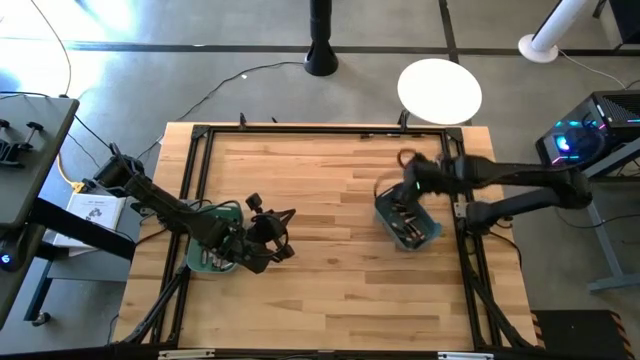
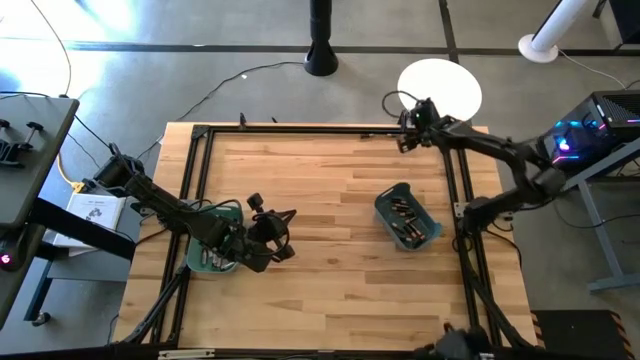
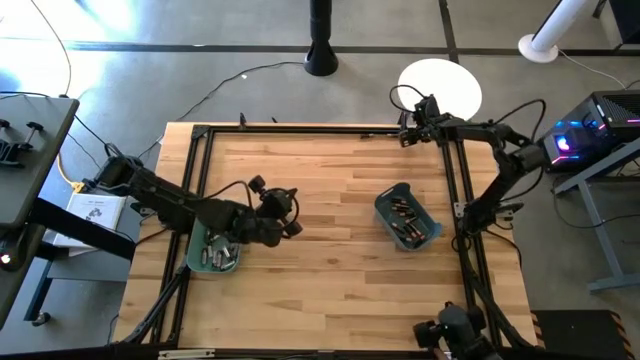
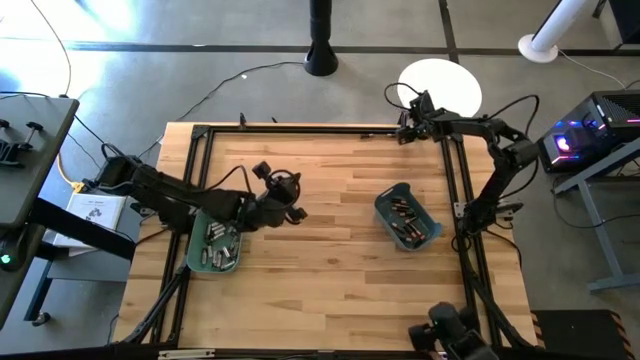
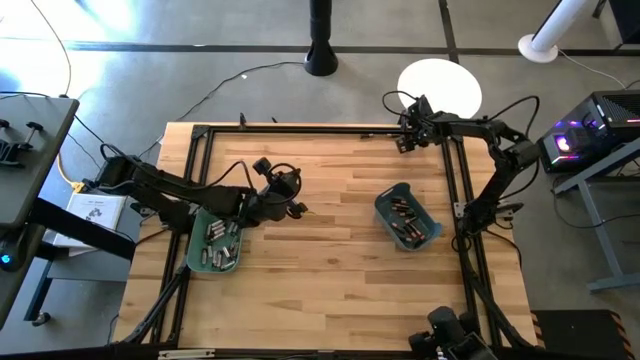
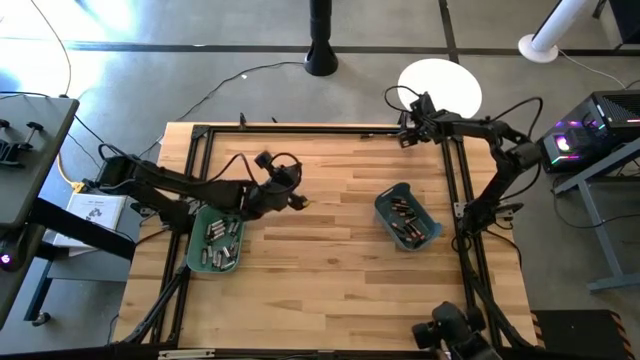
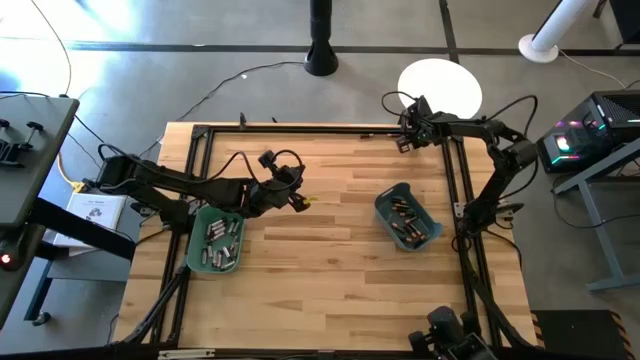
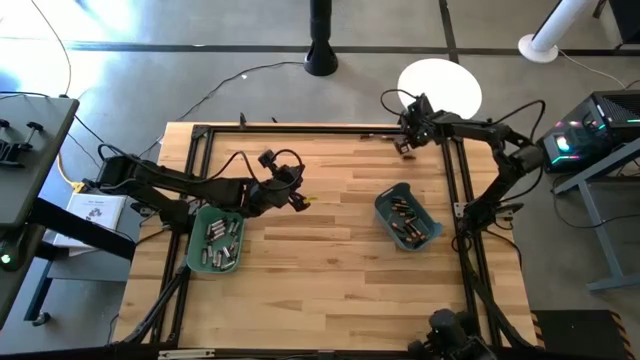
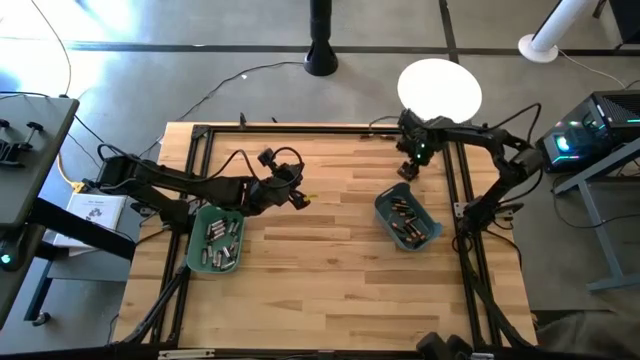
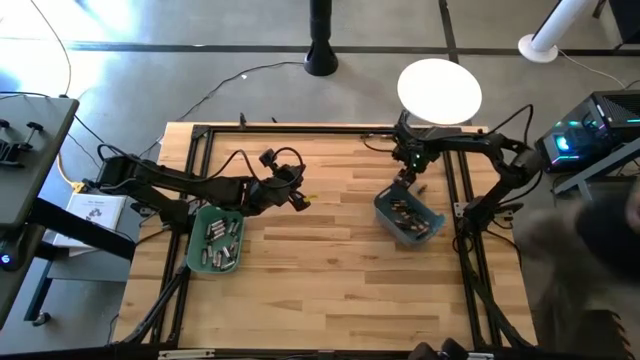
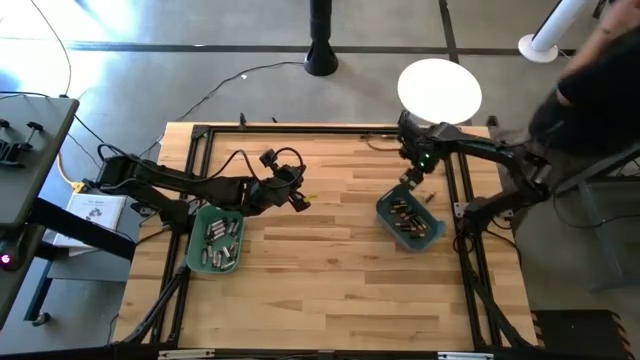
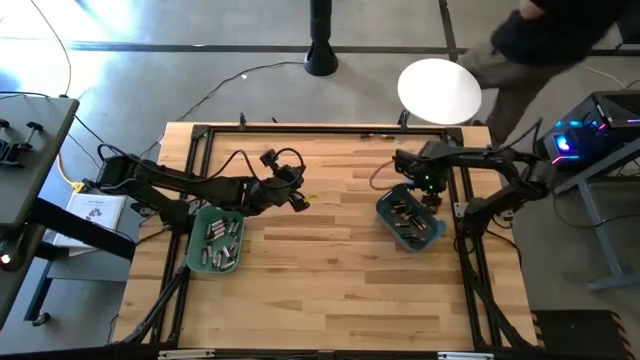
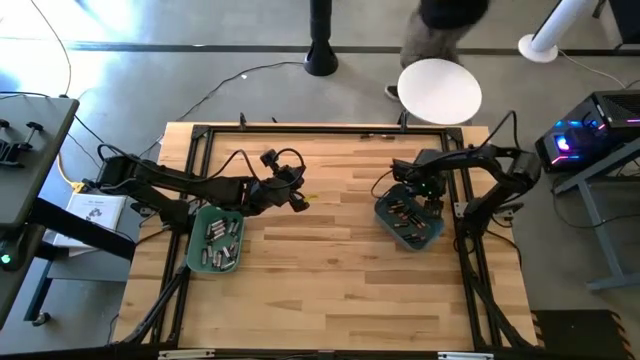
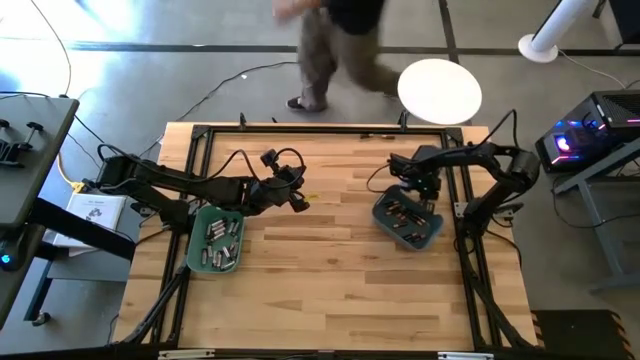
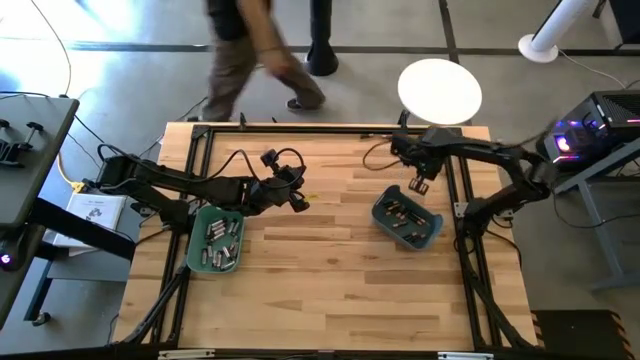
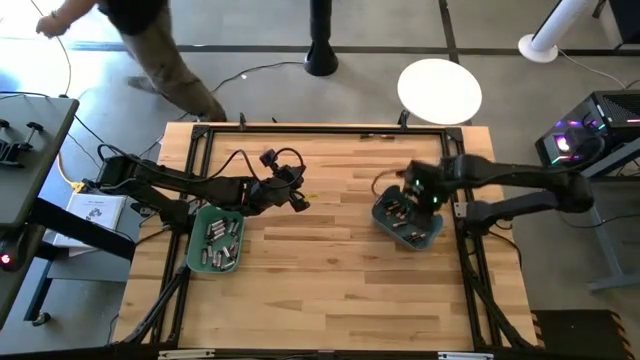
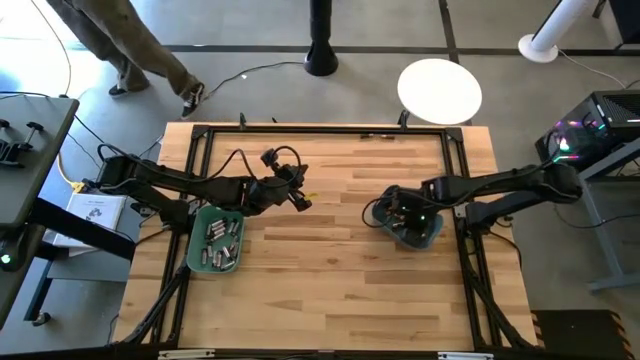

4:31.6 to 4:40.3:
Task: Sort batteries
Put the black battery into the blue bin

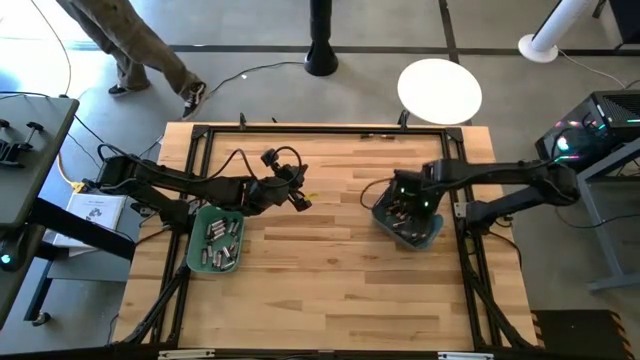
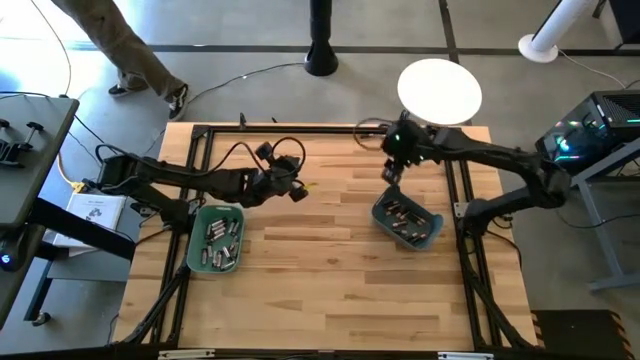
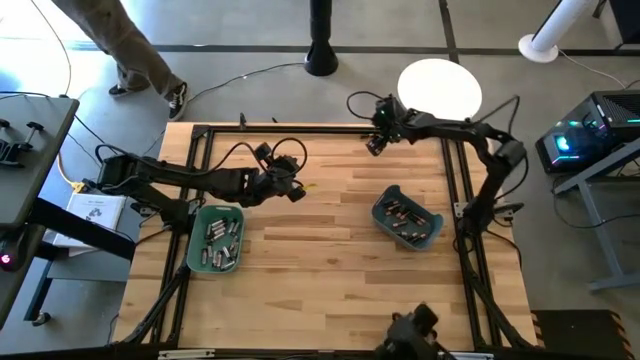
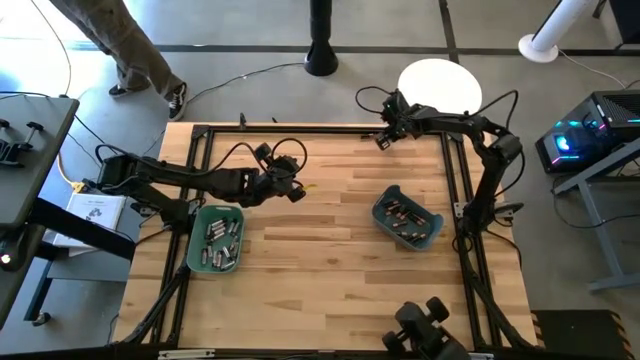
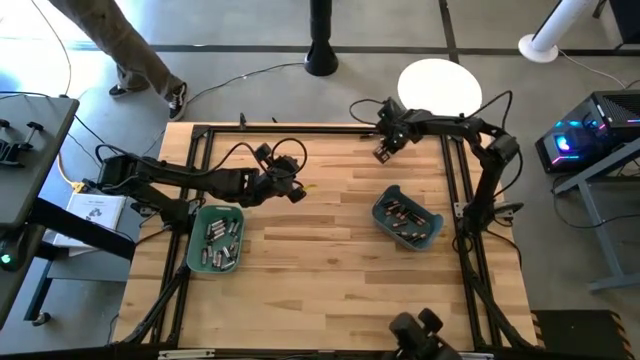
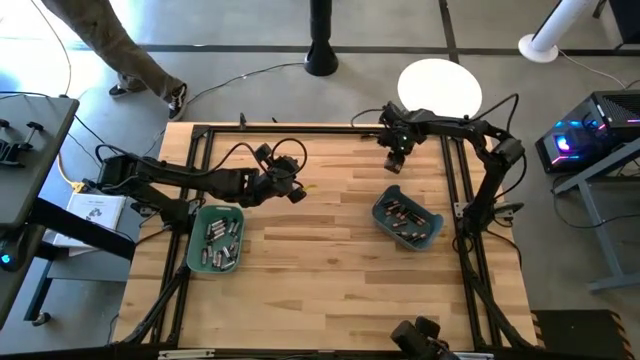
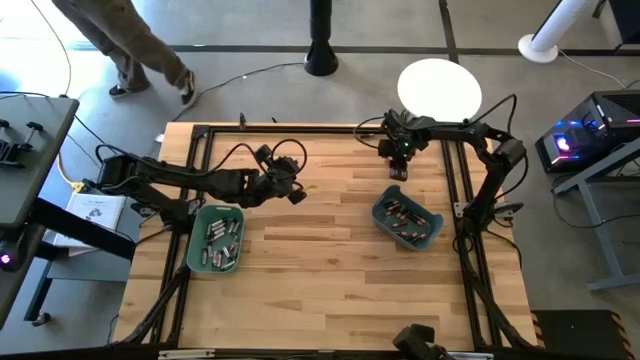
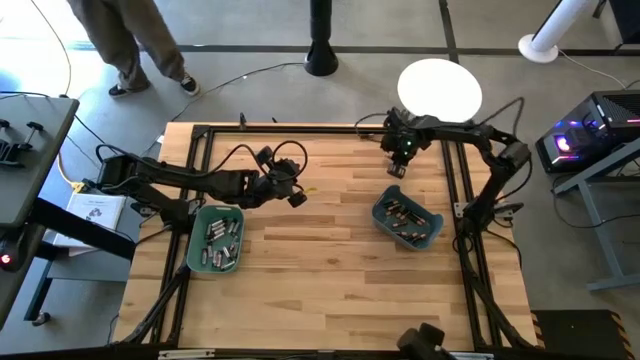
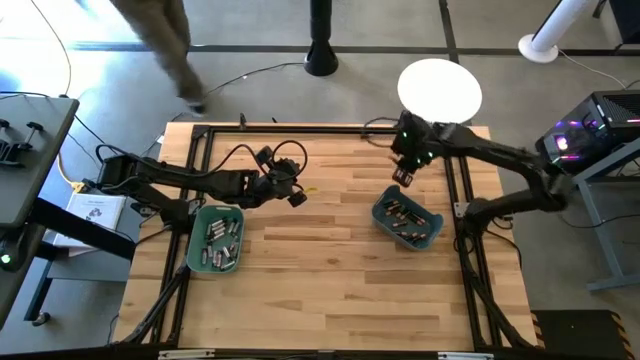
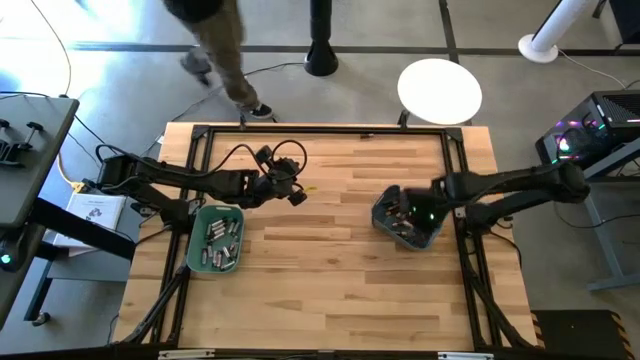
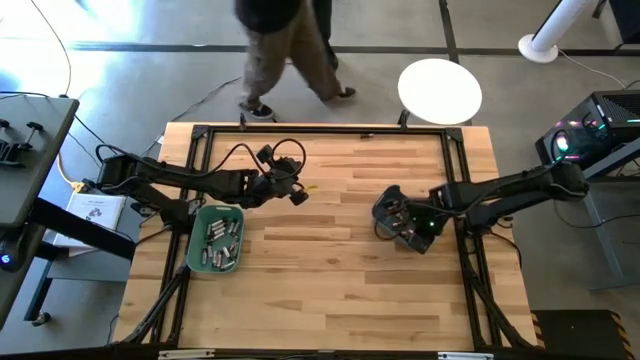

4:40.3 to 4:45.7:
Put the black battery into the blue bin

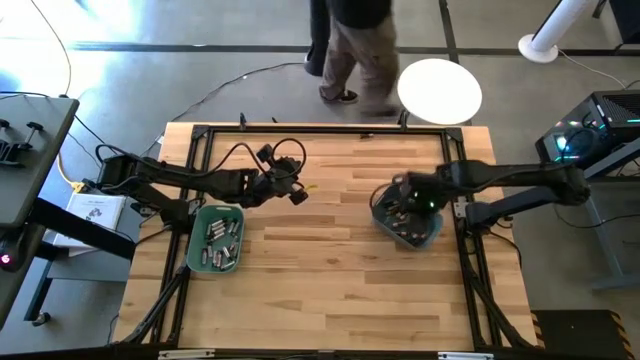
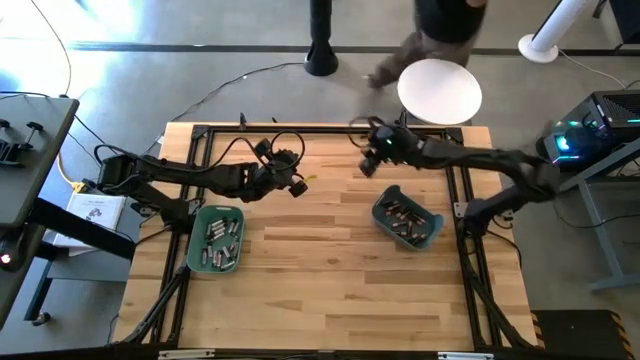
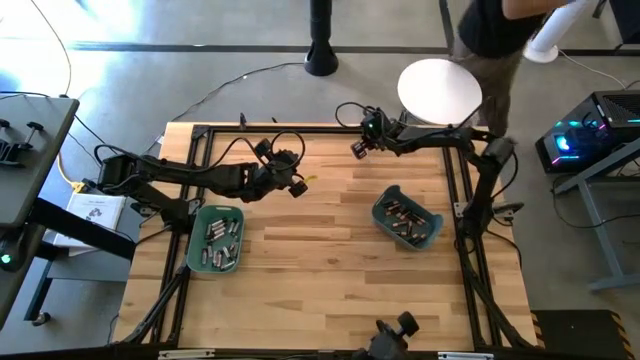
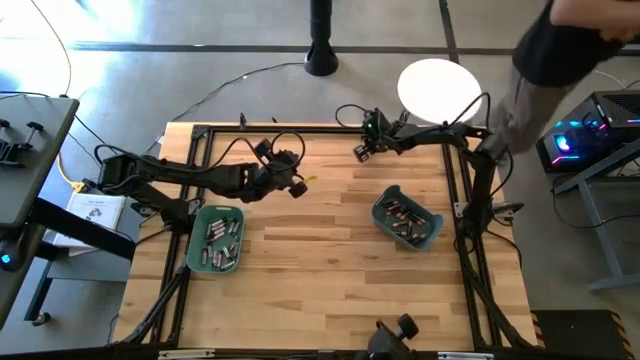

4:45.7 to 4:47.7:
Put the black battery into the blue bin

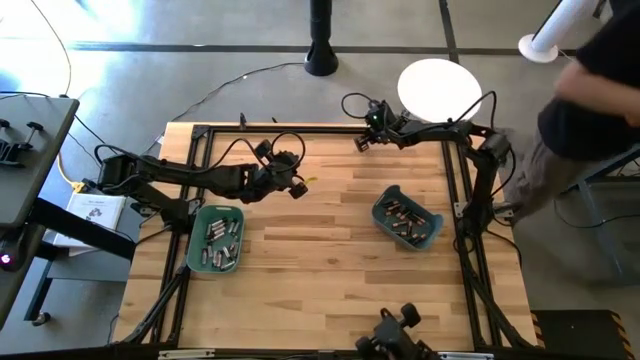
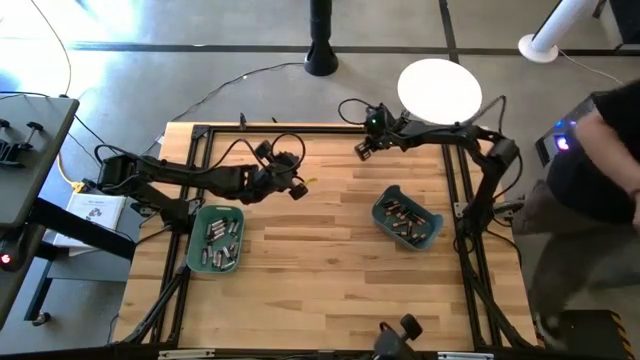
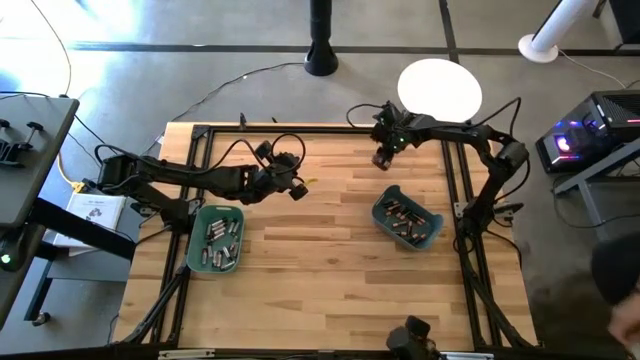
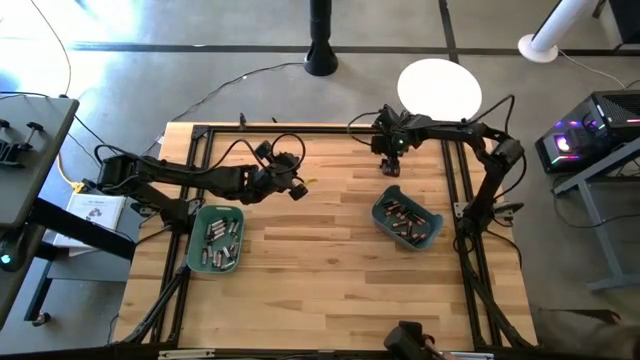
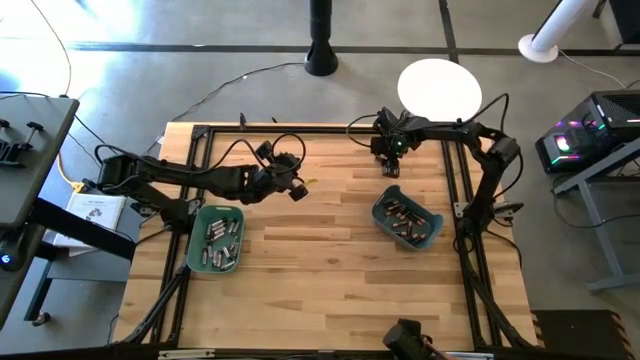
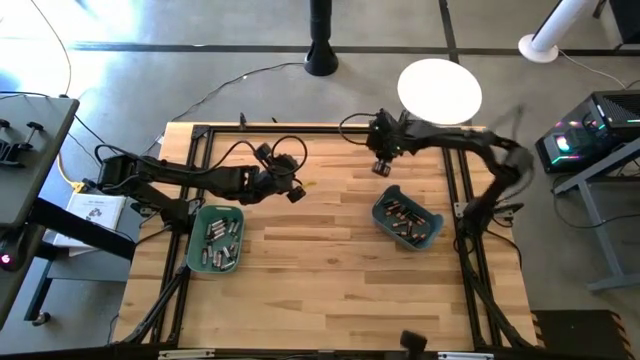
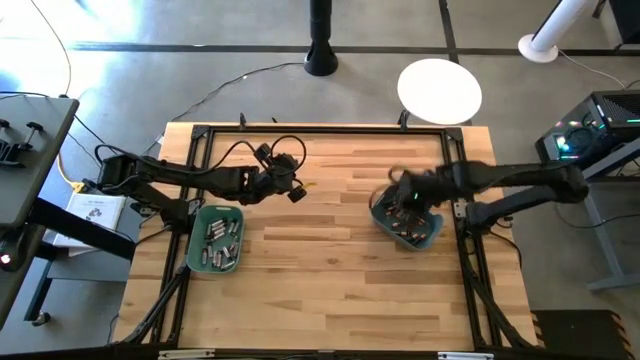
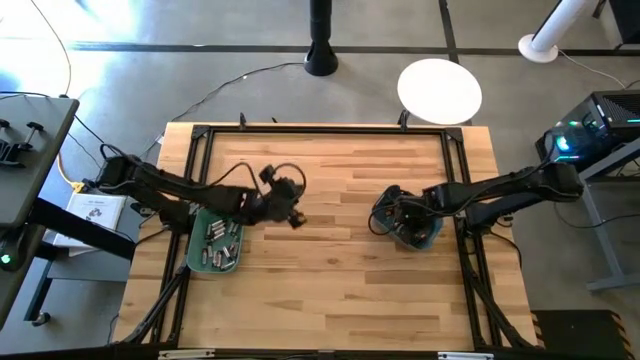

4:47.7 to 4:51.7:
Put the black battery into the blue bin

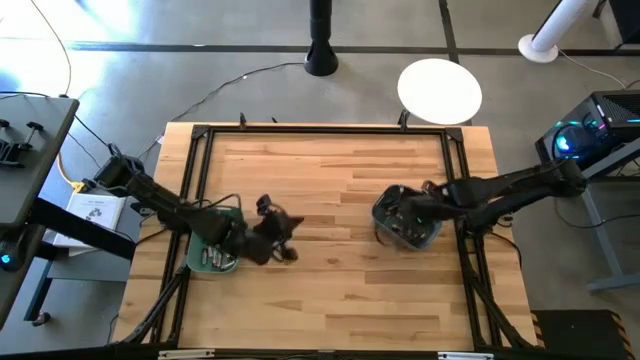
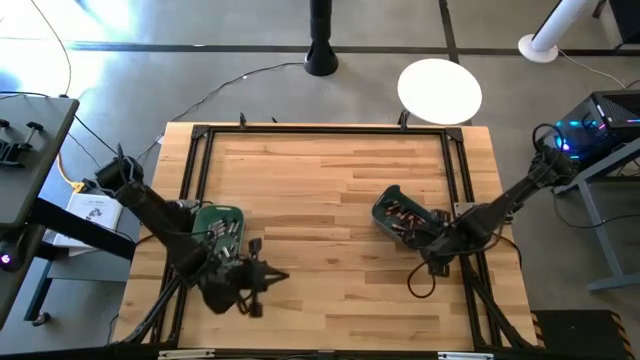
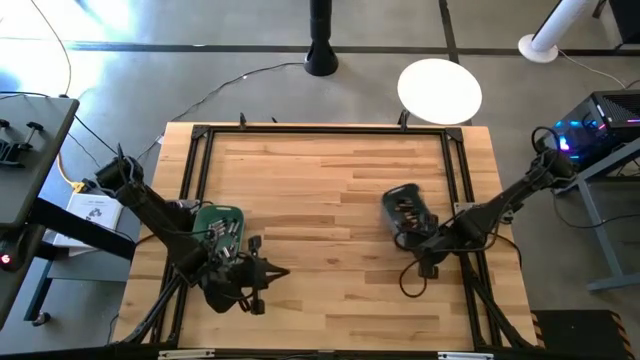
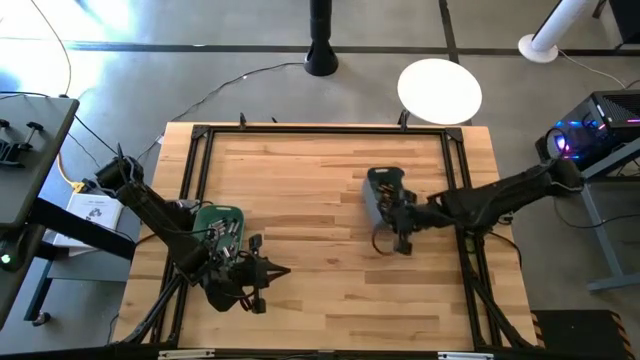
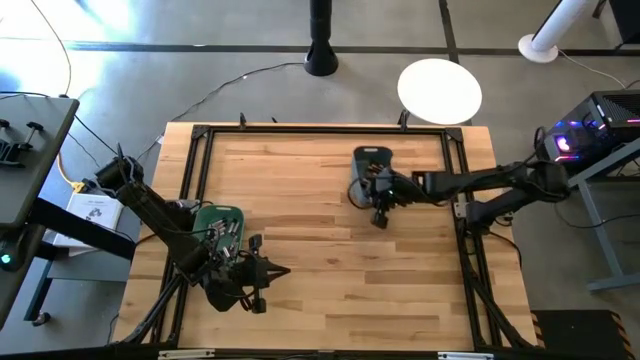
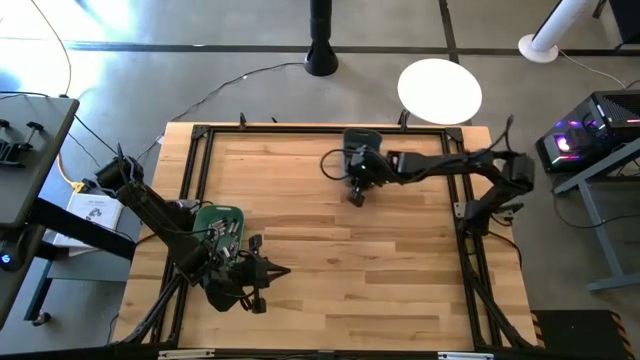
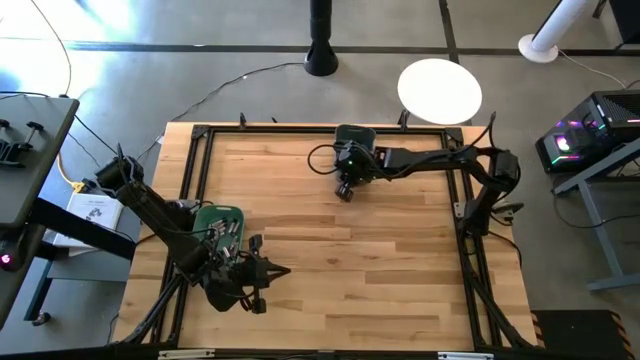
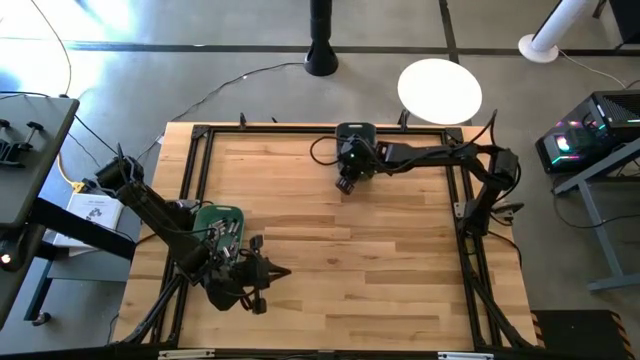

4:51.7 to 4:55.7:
Move the blue bin to the top of the table
